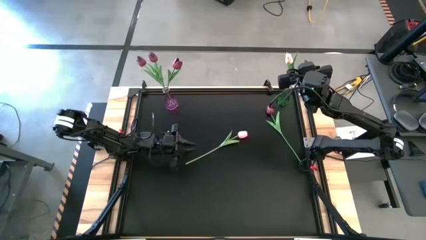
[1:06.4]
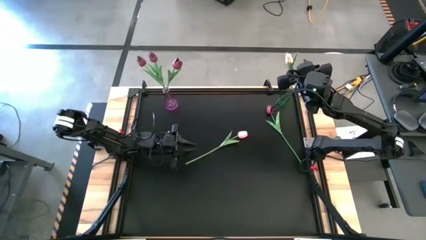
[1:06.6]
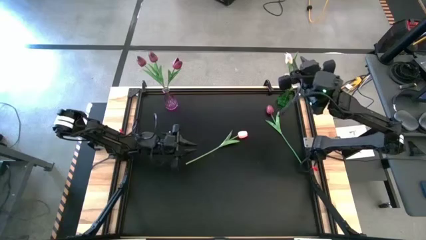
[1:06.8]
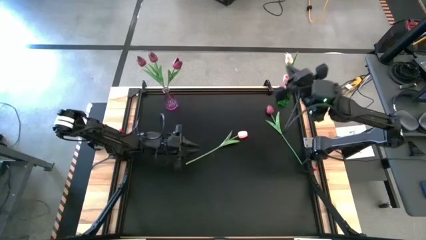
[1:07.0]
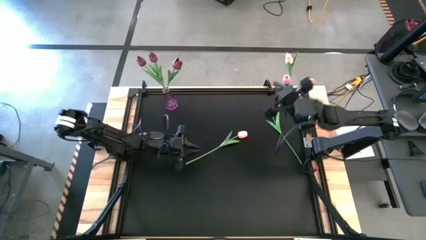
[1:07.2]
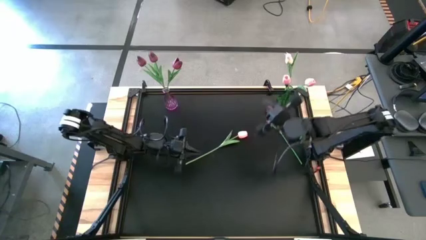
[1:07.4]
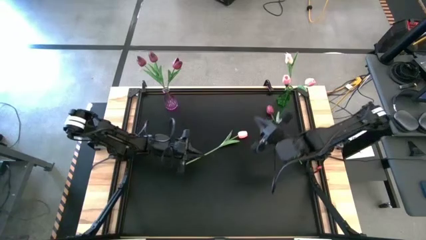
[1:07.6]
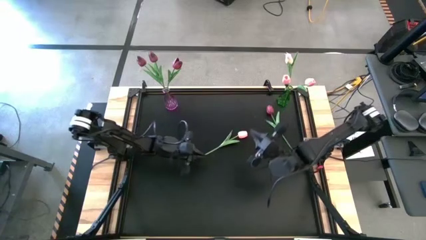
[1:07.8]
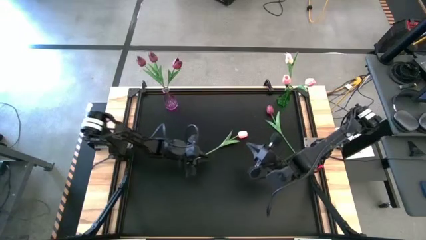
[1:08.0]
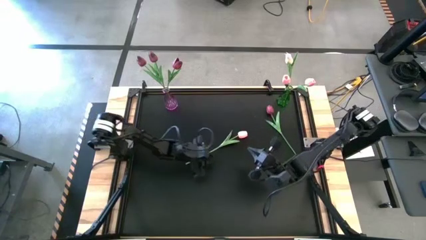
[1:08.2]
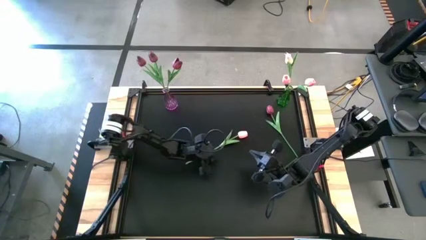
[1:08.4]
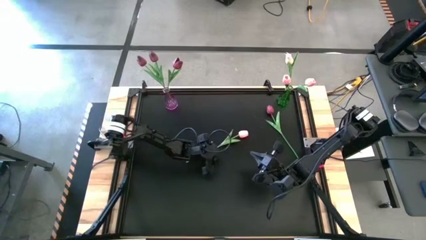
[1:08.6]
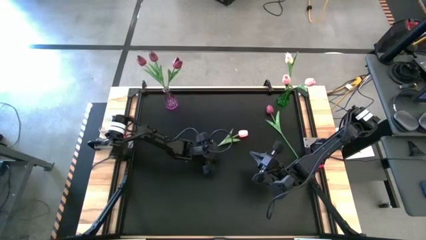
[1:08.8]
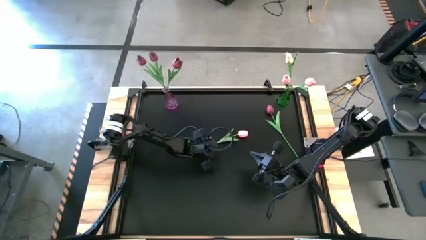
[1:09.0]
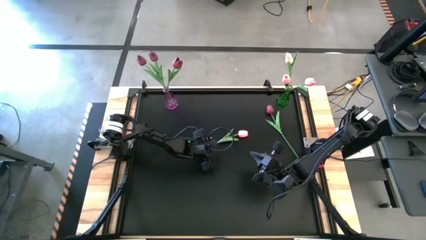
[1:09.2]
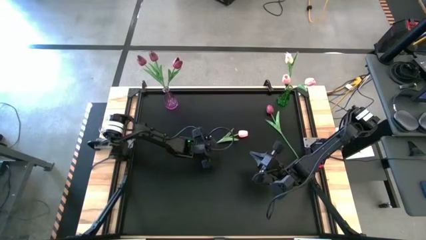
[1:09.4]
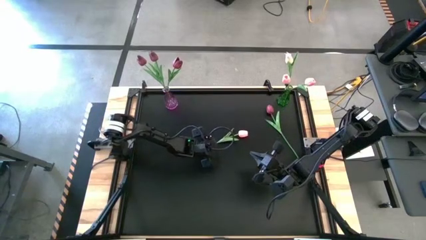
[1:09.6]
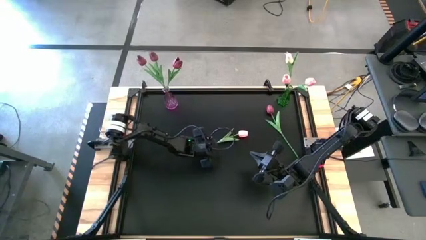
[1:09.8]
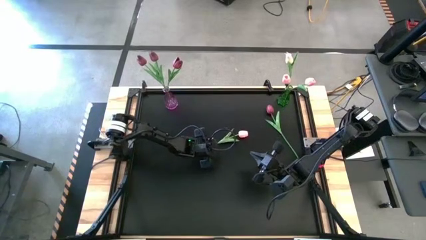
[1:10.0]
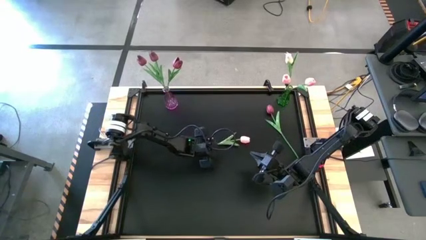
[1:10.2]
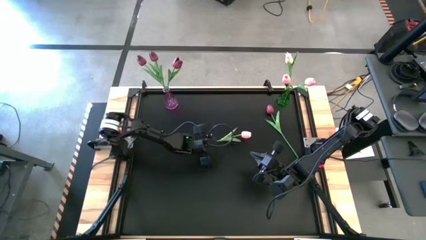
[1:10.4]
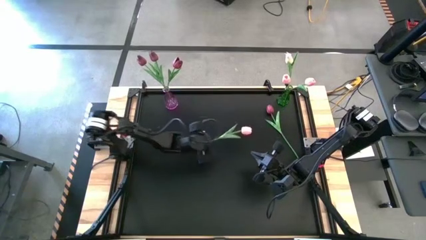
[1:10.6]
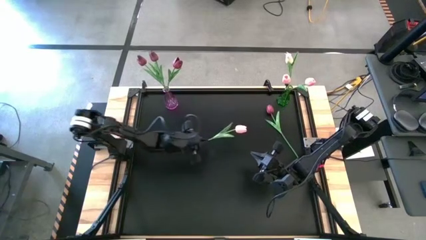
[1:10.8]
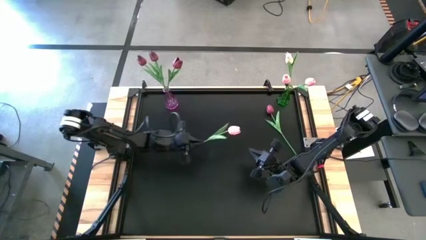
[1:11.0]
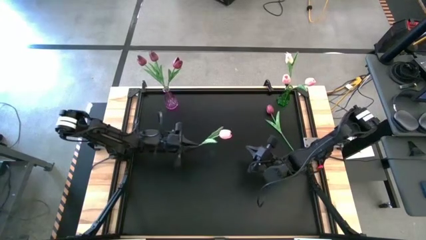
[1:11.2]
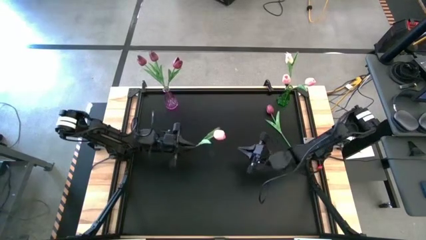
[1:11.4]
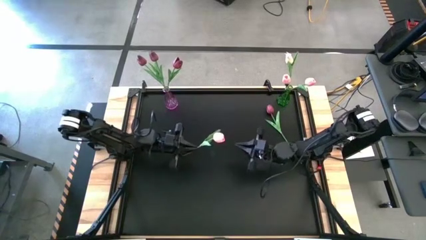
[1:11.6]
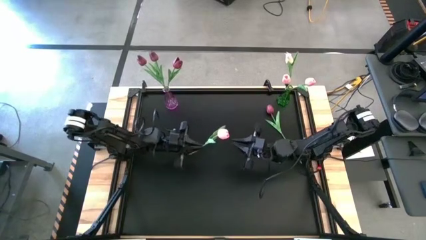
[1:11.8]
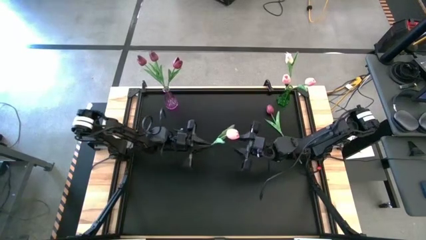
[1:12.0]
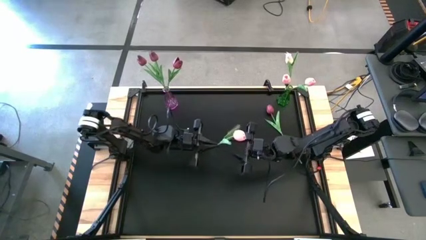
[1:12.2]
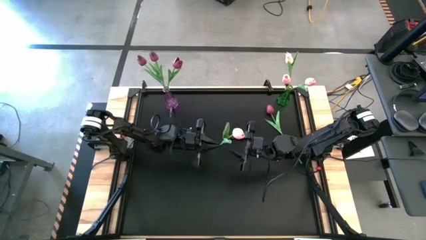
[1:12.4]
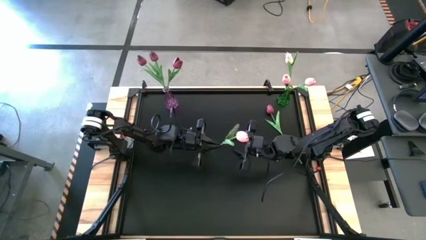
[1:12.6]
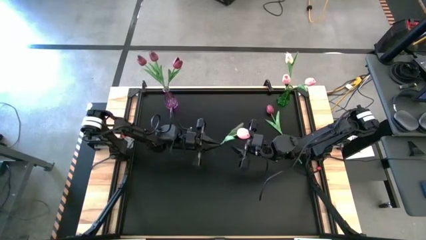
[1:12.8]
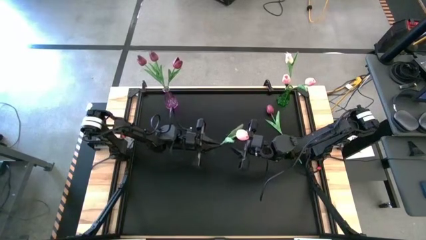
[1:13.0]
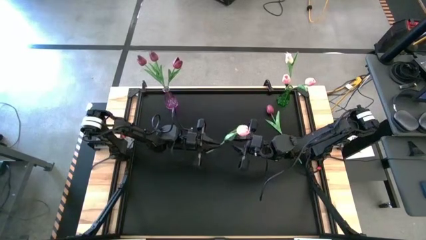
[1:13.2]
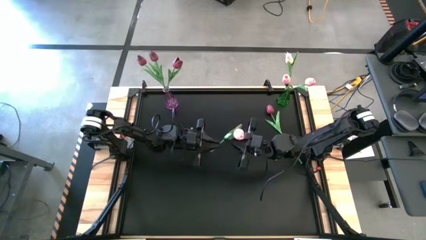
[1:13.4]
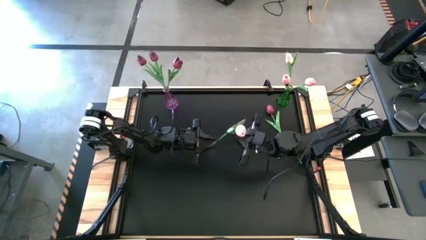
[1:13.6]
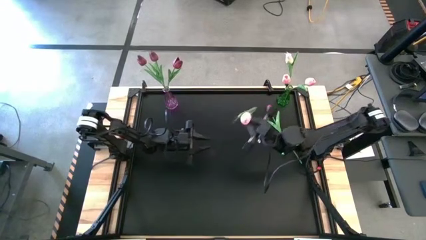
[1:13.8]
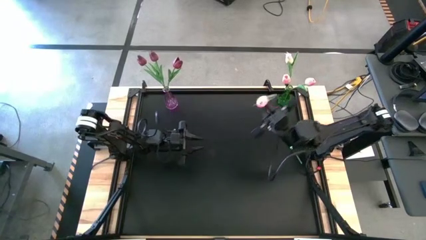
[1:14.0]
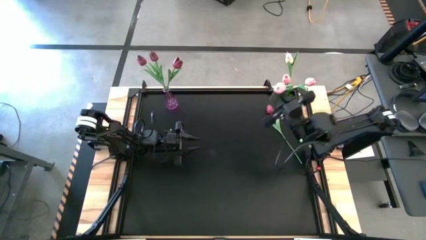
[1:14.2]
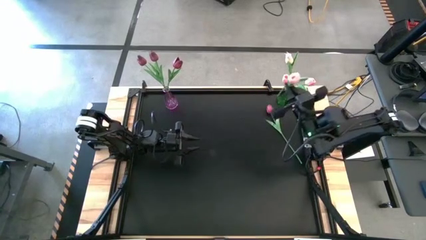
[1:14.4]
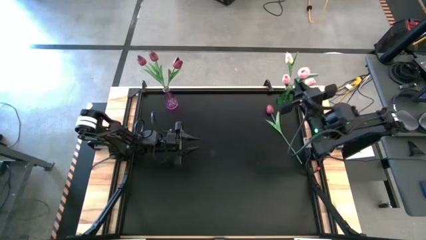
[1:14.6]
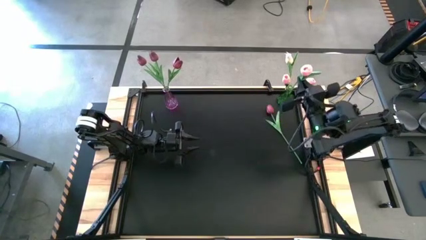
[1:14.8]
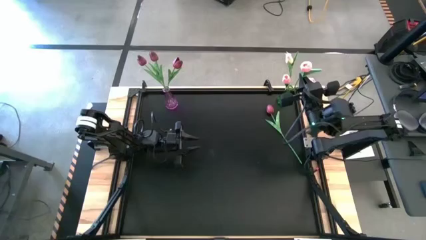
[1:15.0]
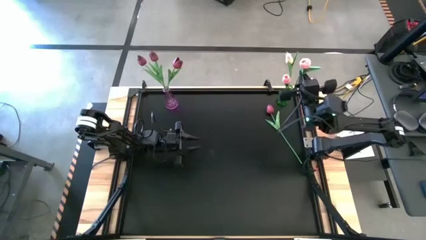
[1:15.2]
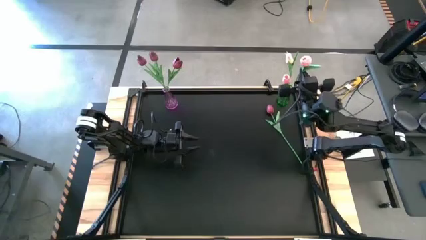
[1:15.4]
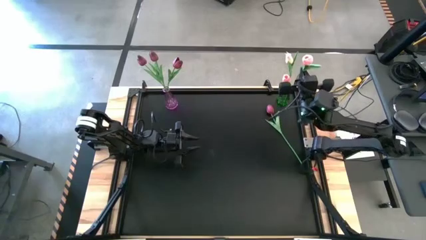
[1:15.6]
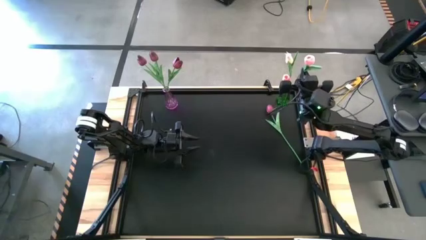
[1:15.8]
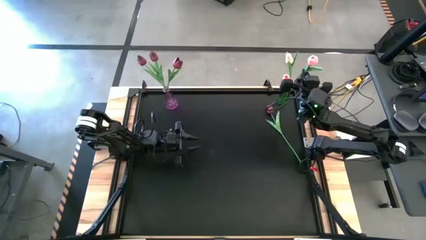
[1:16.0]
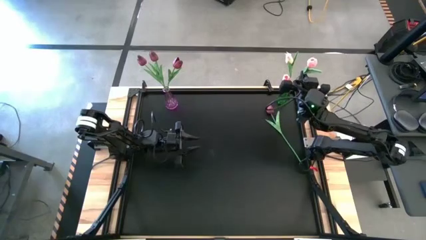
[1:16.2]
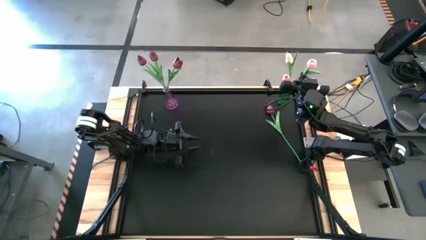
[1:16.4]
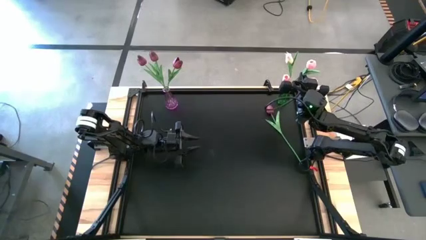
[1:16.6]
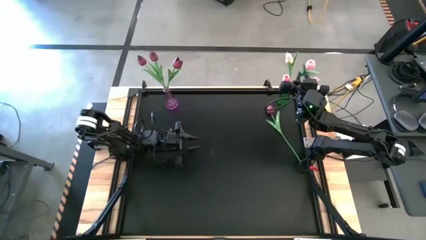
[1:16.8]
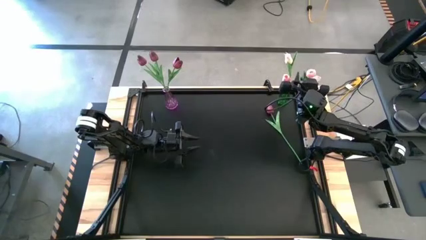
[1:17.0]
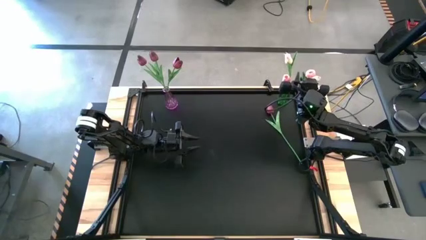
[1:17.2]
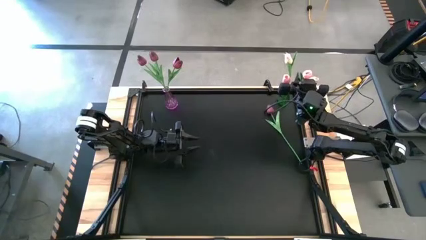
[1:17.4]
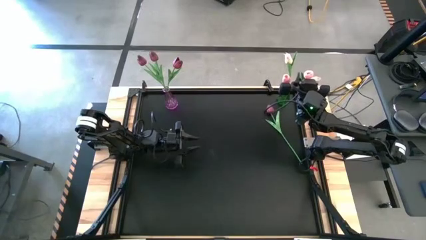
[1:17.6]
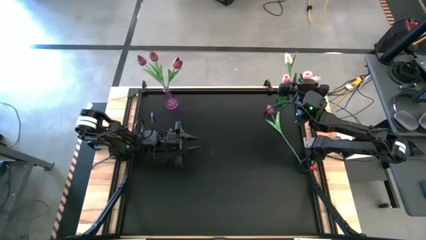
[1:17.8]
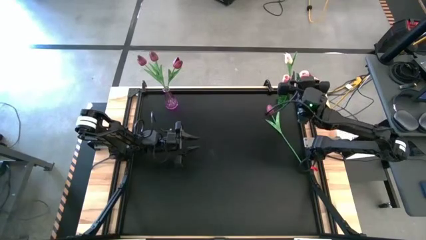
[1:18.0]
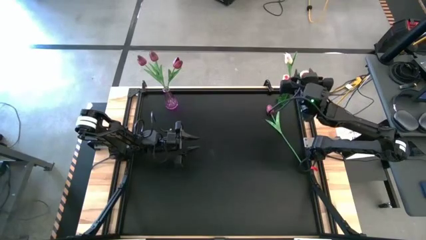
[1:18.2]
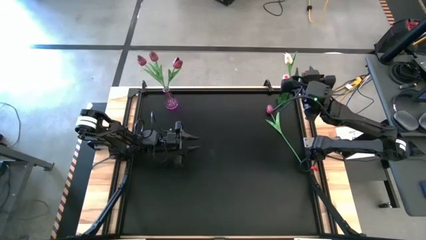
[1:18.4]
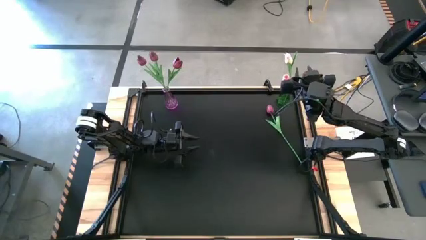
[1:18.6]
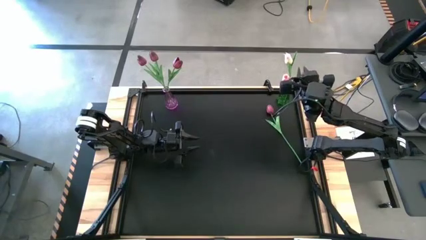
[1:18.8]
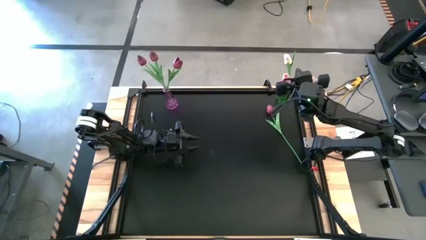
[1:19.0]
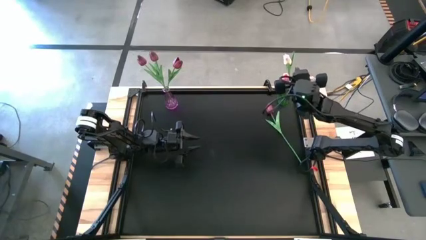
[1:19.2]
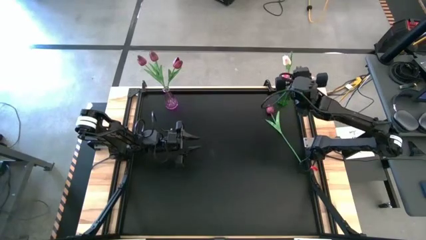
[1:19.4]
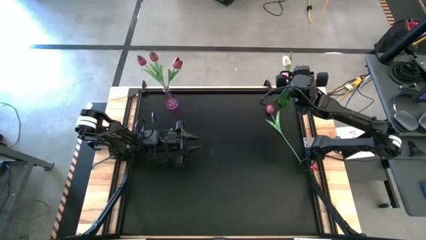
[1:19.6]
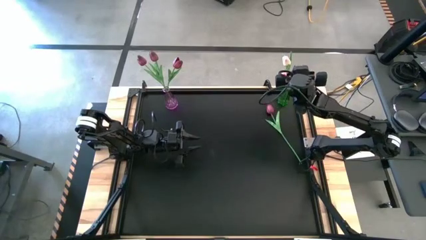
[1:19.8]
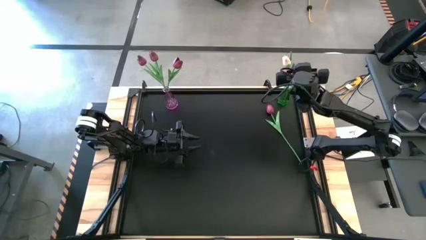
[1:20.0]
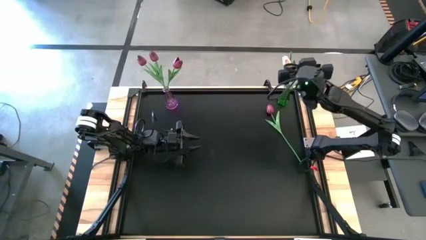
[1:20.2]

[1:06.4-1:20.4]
Task: Sort flowers into vase by color
Put the pink flower into the green vase
